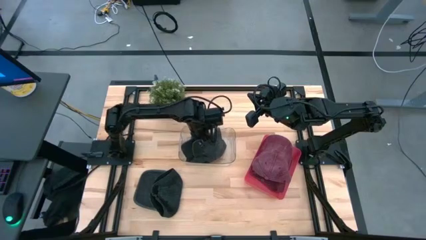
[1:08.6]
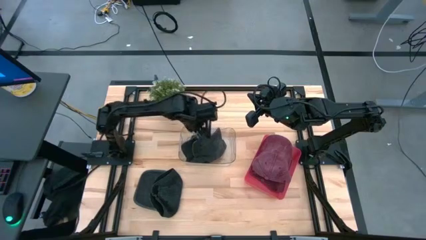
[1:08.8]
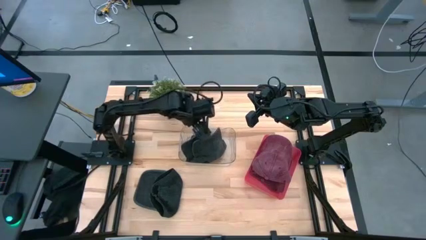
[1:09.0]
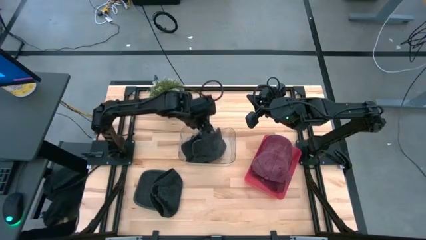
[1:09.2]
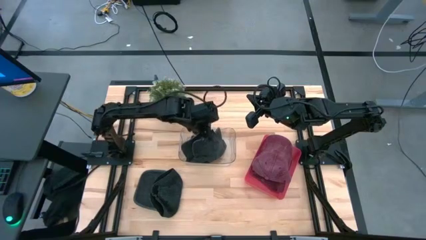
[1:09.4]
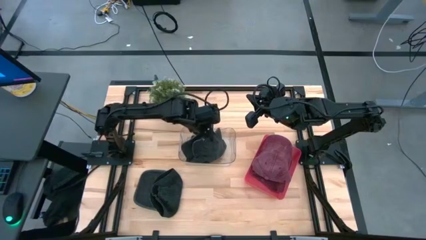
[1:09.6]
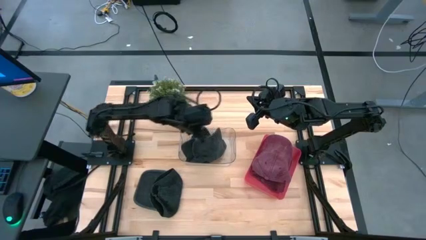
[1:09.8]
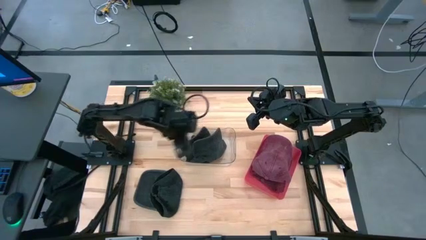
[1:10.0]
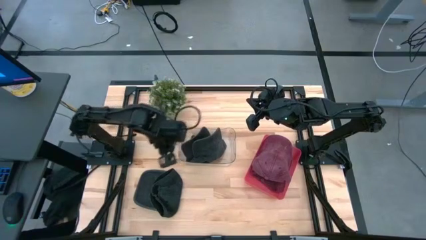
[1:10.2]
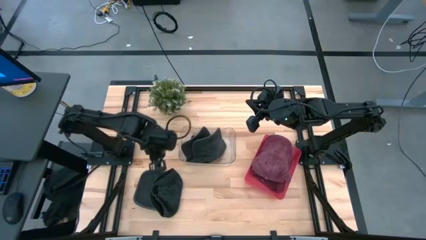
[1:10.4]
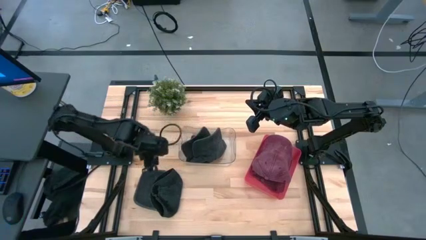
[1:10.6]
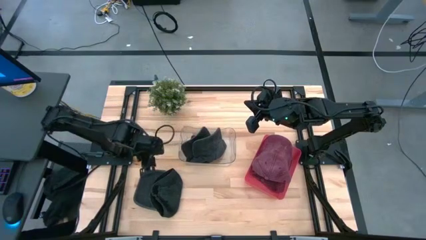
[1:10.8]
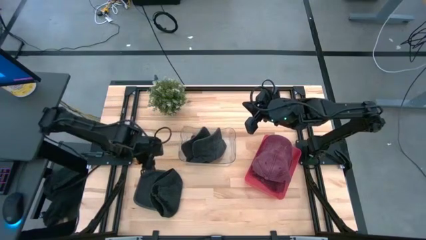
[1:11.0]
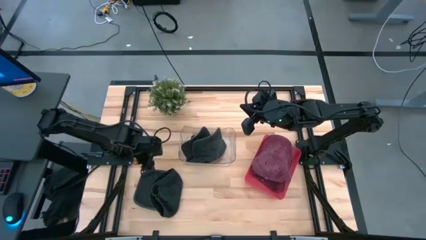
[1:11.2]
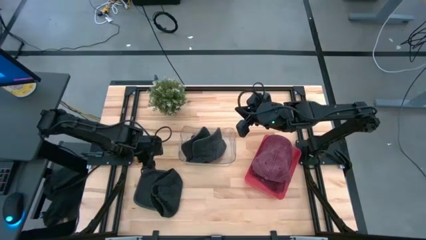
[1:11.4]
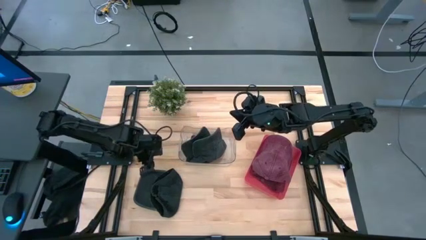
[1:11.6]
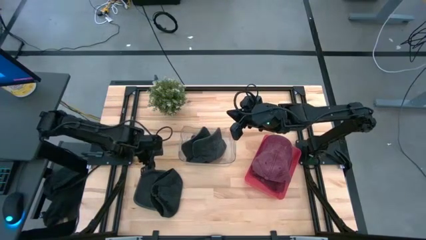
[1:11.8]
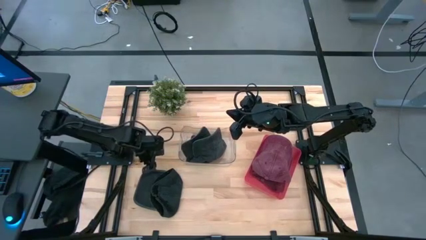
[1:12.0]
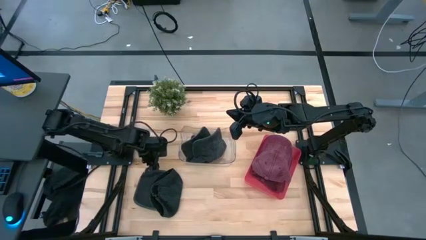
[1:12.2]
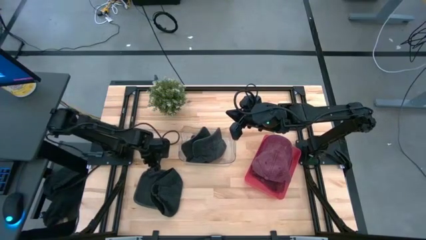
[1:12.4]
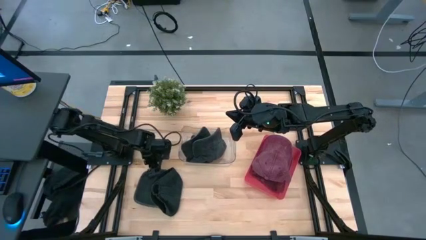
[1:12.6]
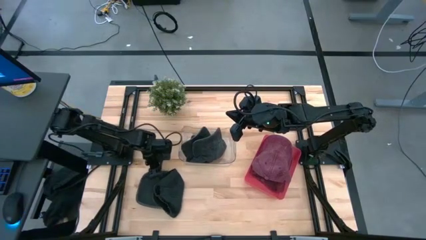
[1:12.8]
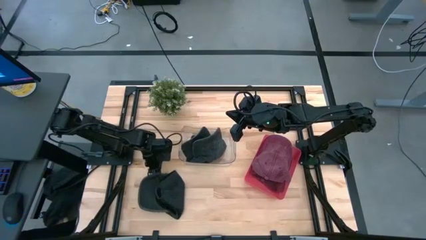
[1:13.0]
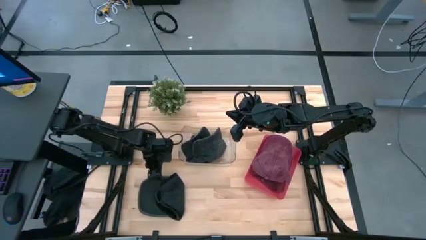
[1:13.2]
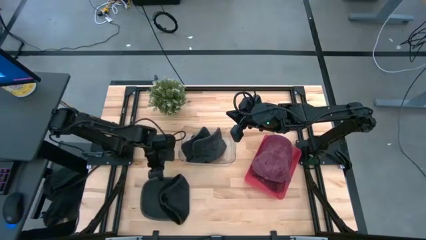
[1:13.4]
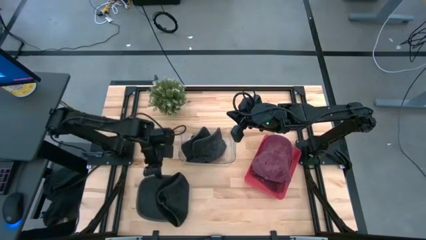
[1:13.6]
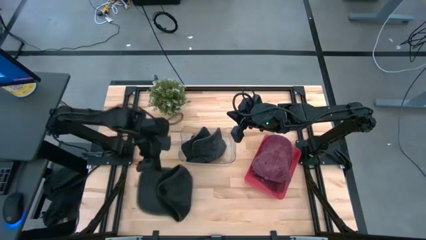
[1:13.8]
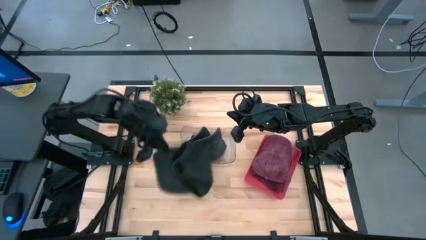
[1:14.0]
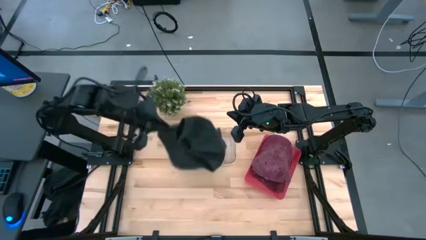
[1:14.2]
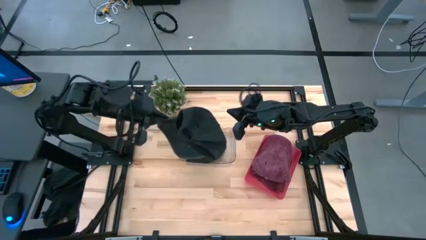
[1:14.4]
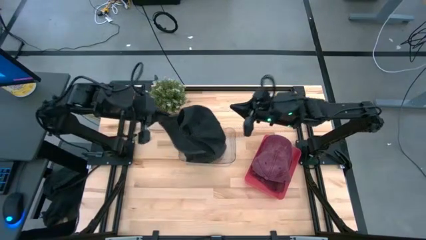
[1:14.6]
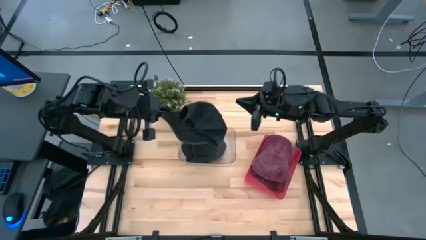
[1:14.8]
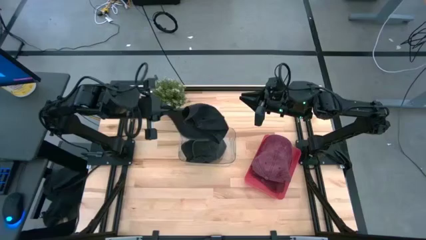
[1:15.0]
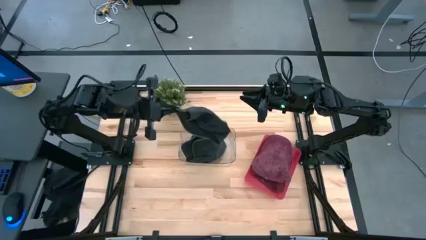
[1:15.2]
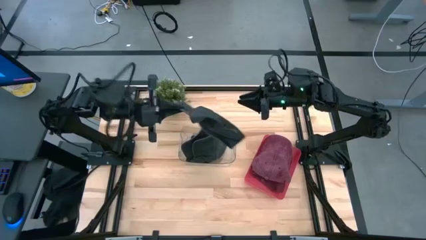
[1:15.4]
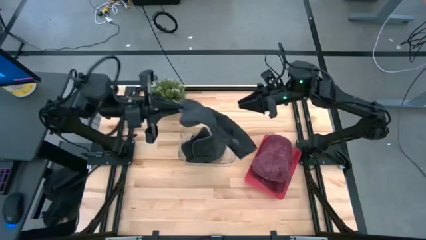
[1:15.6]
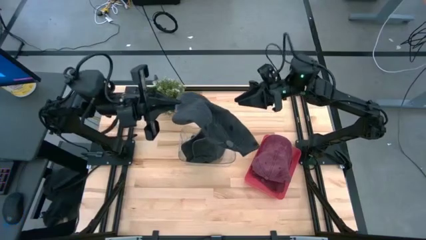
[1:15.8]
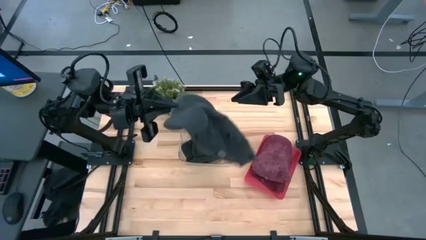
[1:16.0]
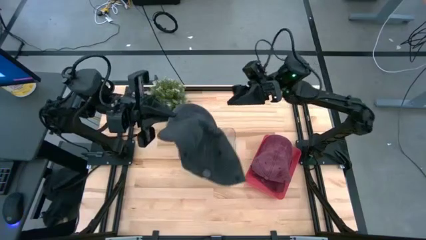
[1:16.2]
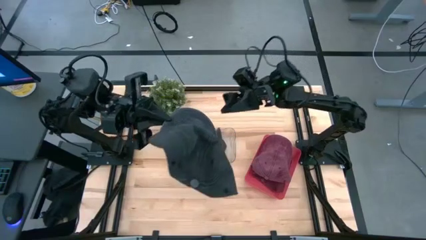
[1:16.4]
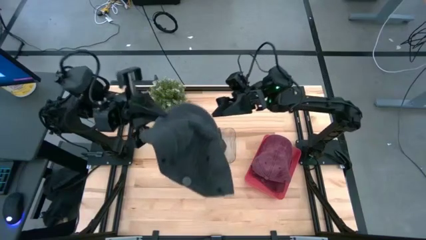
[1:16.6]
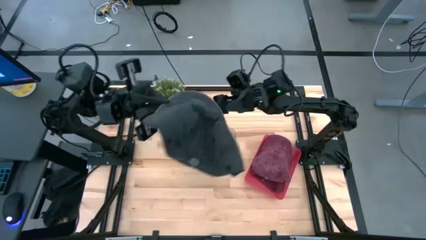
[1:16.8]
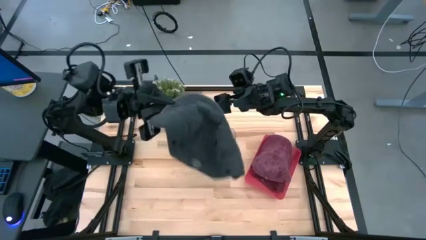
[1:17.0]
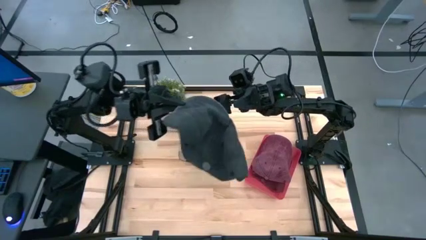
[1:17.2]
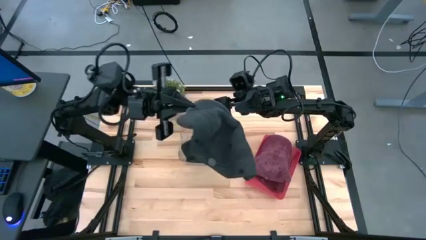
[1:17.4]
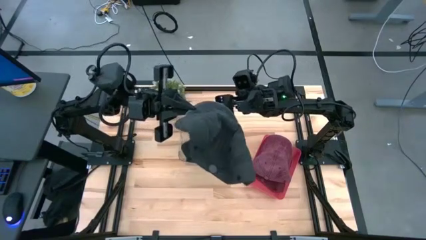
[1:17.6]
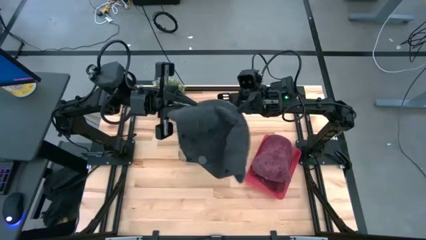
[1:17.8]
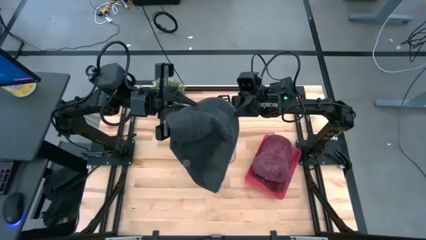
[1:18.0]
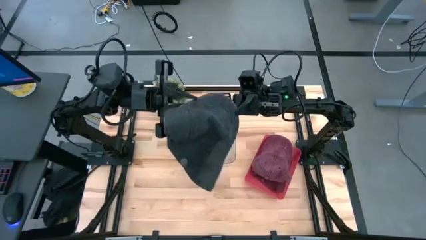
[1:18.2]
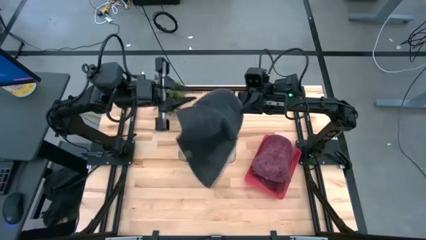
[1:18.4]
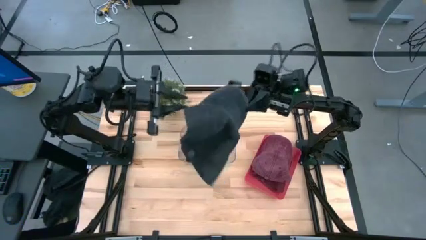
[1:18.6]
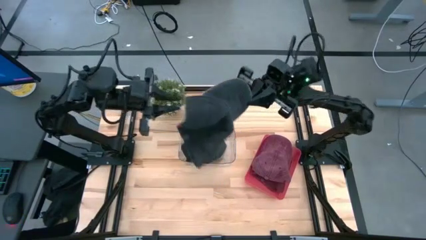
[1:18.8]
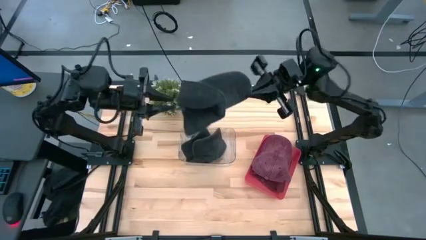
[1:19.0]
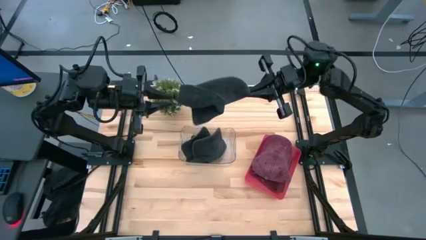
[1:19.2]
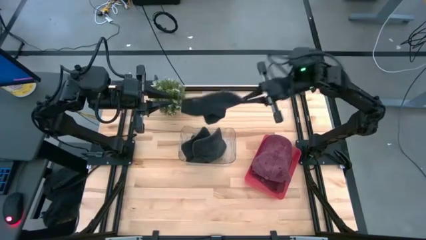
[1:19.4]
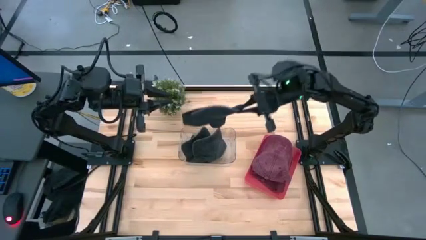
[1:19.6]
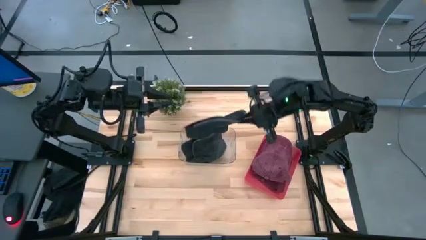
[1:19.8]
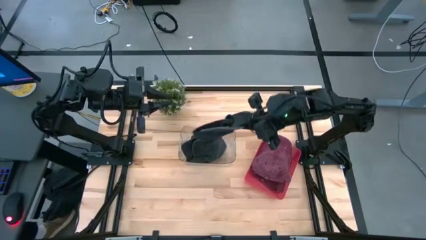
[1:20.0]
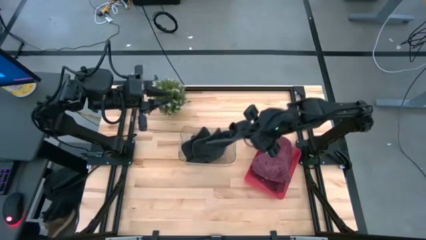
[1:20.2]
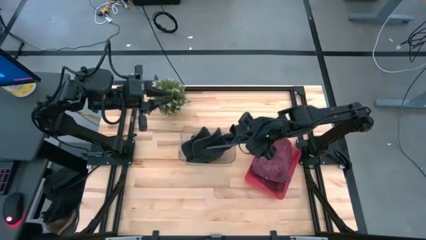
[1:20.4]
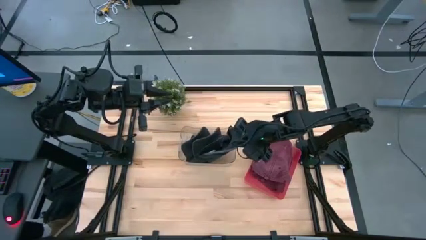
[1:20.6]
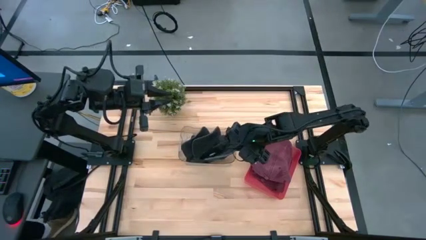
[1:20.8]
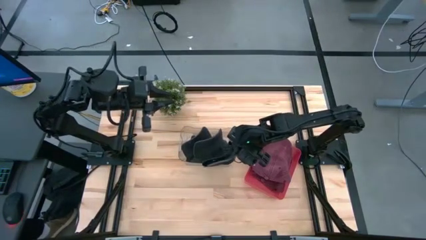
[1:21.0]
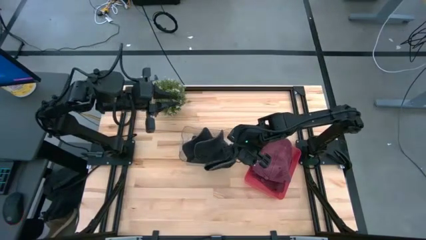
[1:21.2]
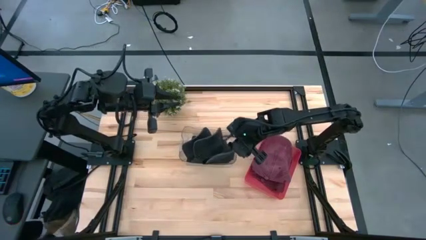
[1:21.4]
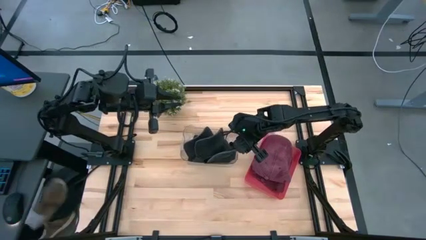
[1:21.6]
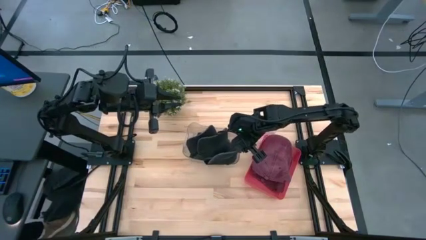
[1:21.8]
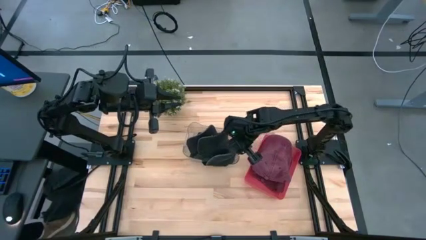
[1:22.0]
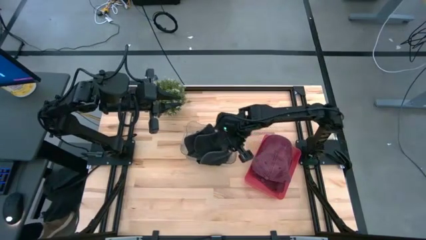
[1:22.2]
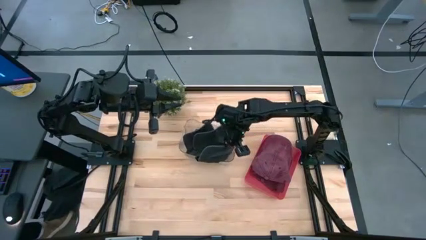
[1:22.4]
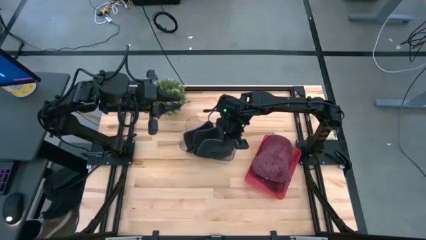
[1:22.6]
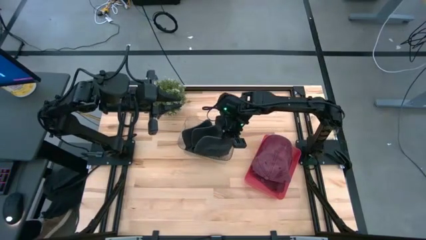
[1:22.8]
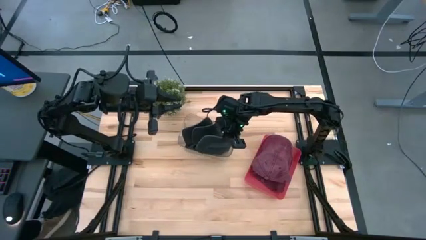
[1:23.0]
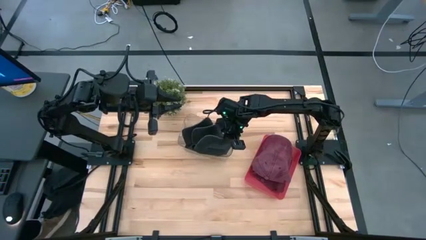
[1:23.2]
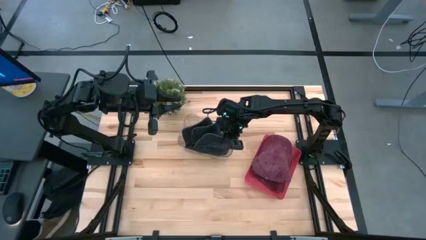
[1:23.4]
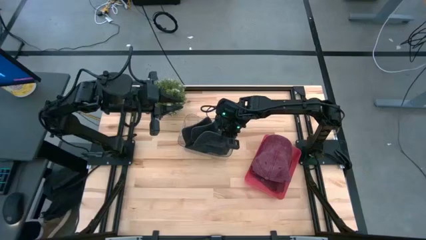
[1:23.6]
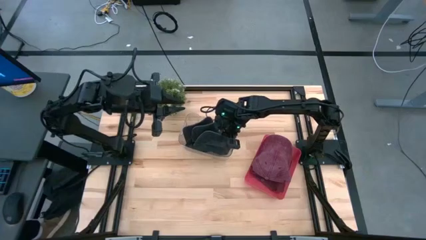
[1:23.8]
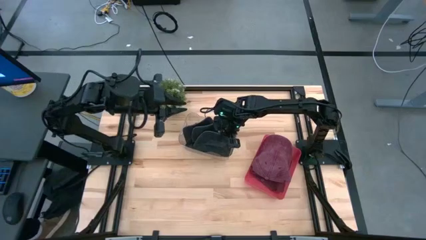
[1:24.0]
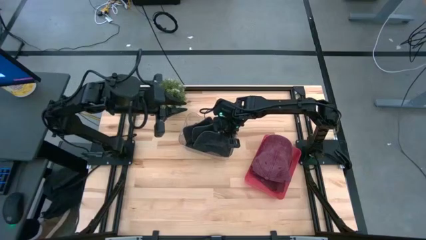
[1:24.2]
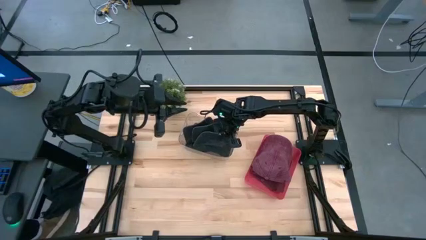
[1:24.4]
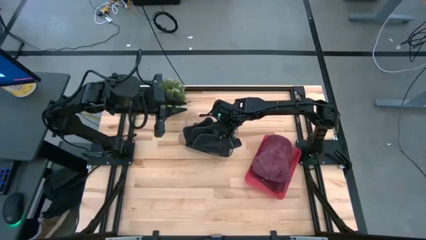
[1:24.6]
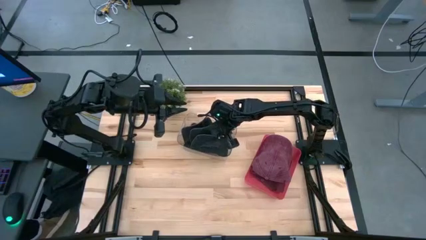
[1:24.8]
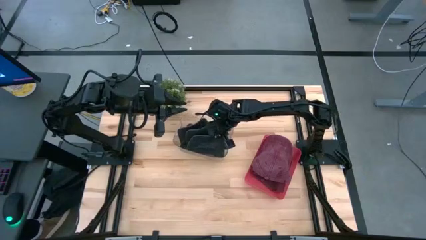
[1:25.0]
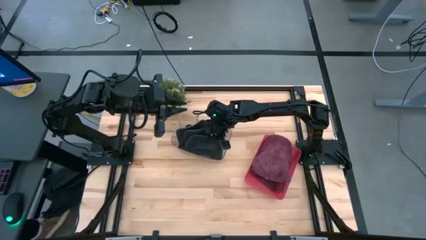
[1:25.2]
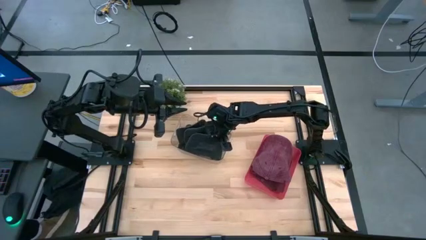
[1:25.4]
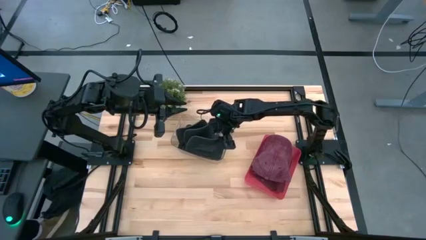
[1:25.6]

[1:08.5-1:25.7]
Task: Pick & Place hat
Put the black cap into the transparent bin
